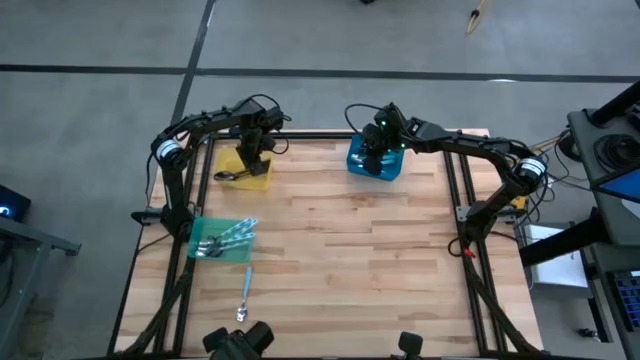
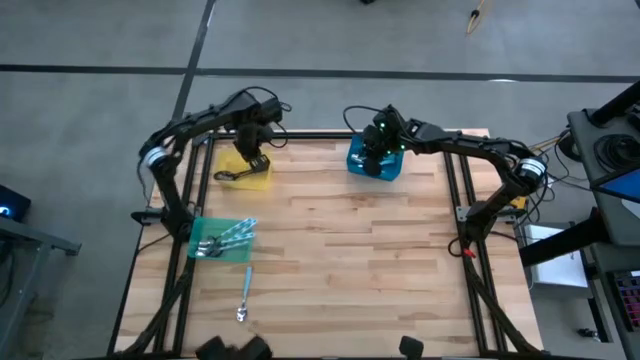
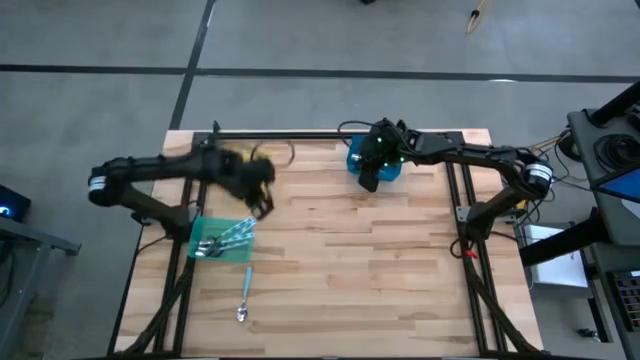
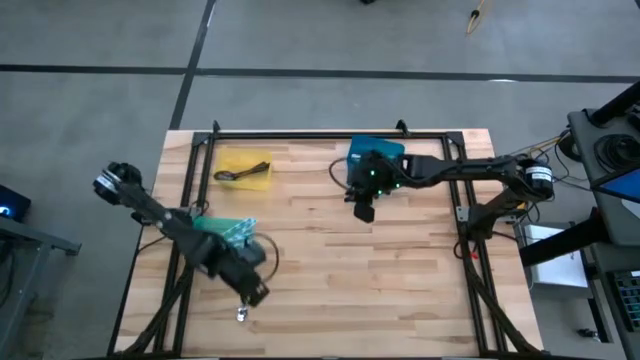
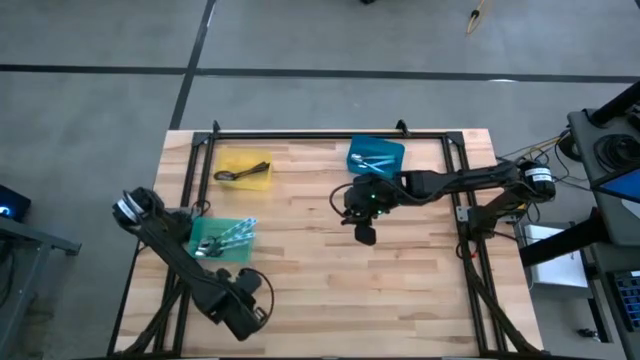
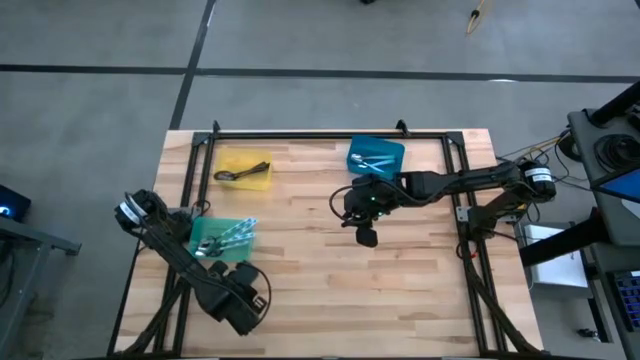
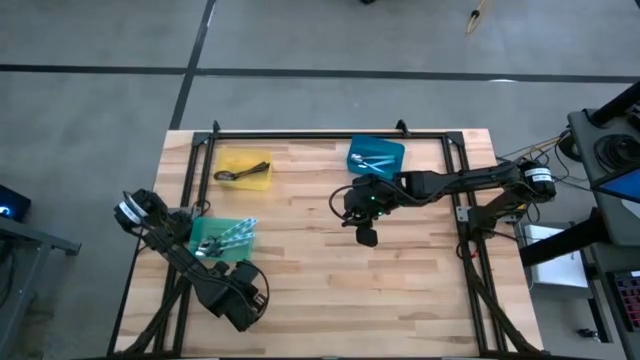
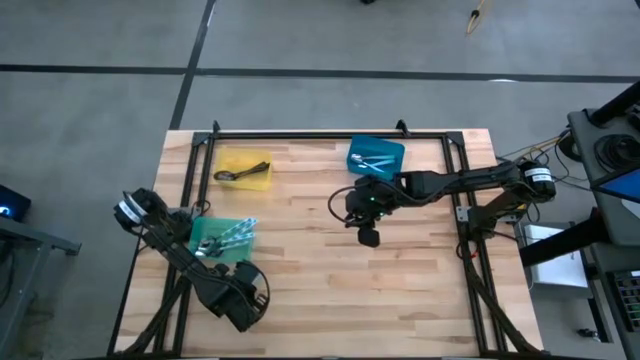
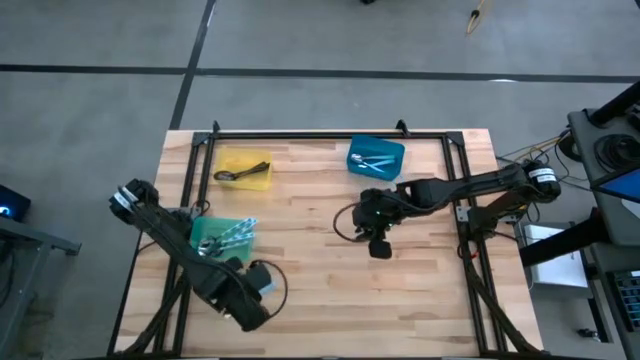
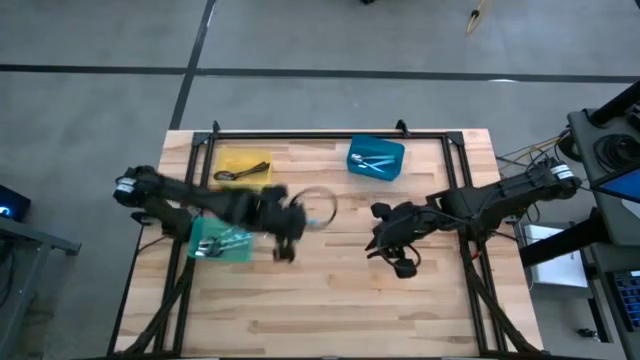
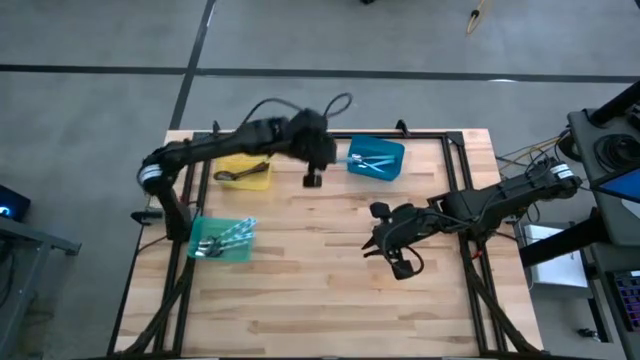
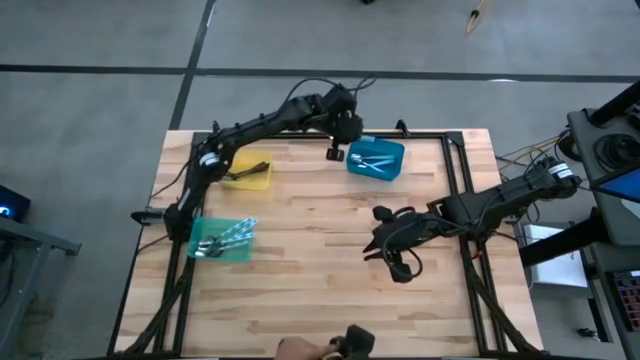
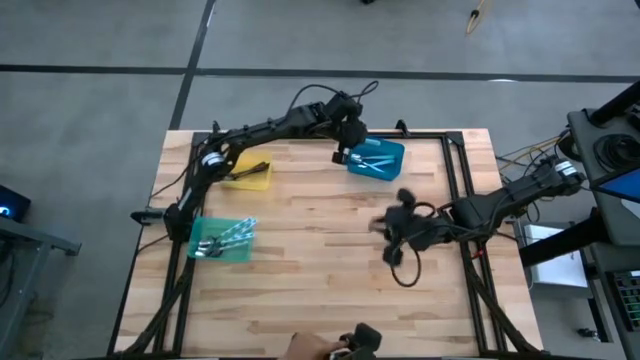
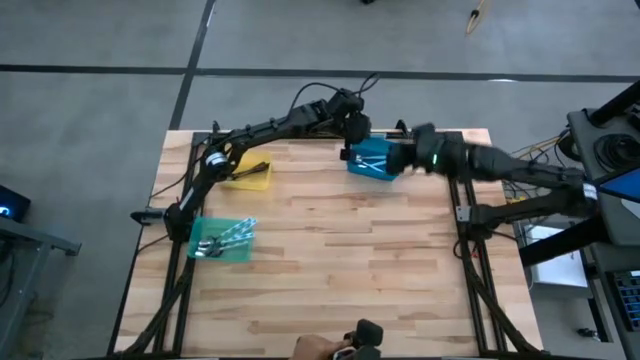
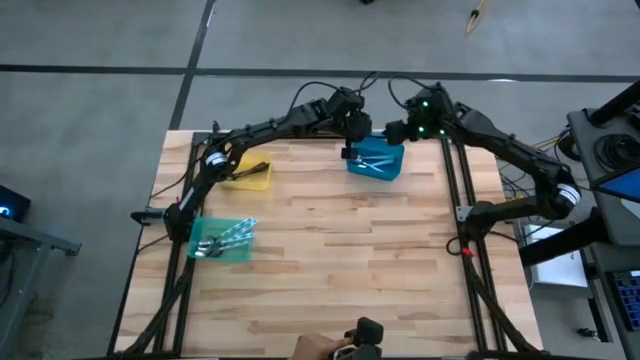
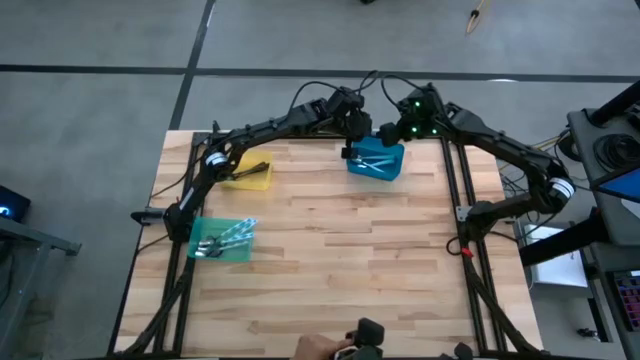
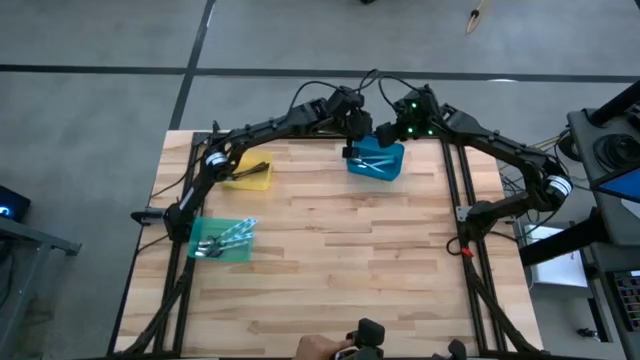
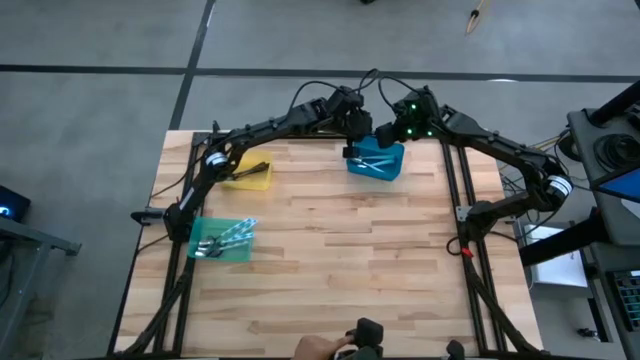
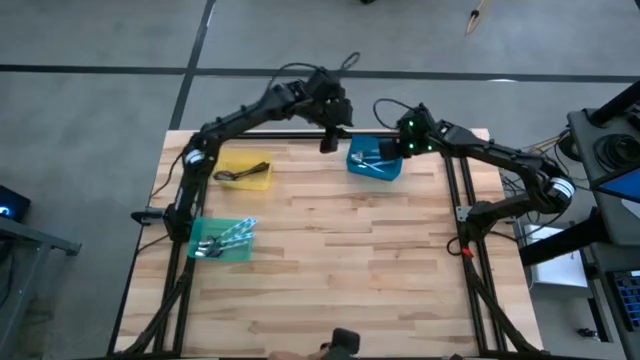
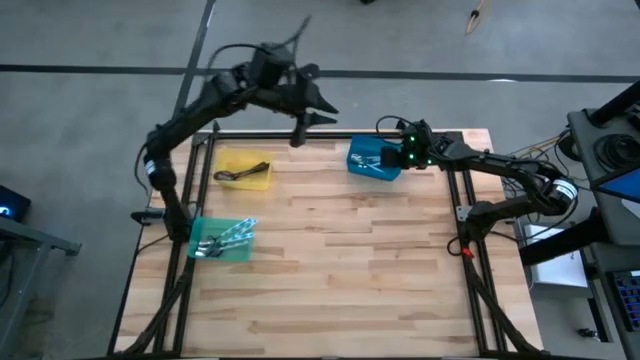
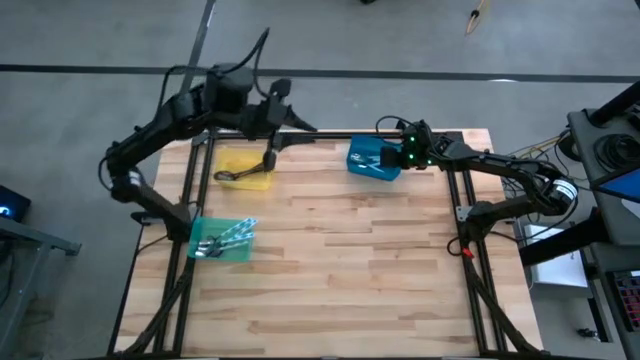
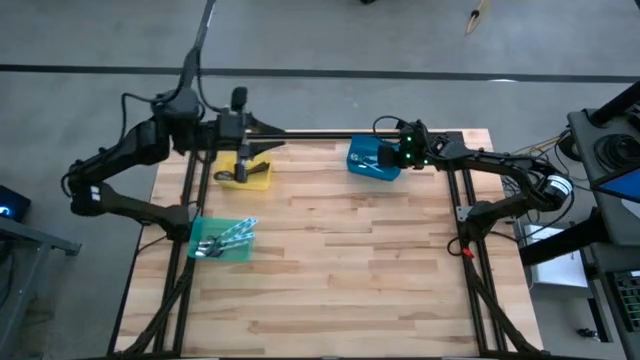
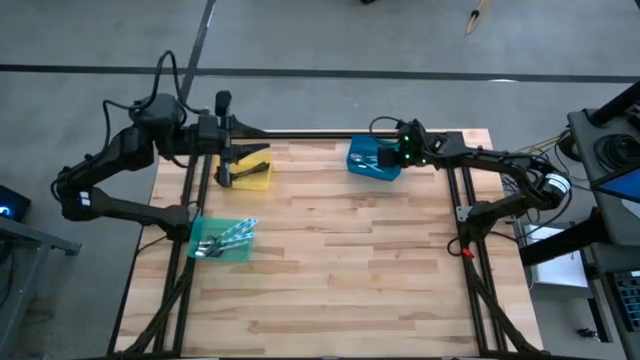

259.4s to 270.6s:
Task: Sort silverware by color (type)
Put the blue spoon into the blue bin

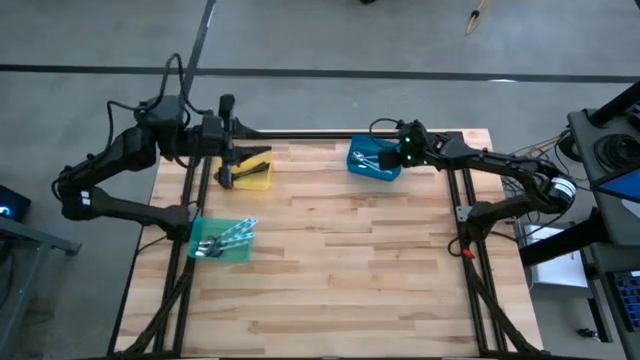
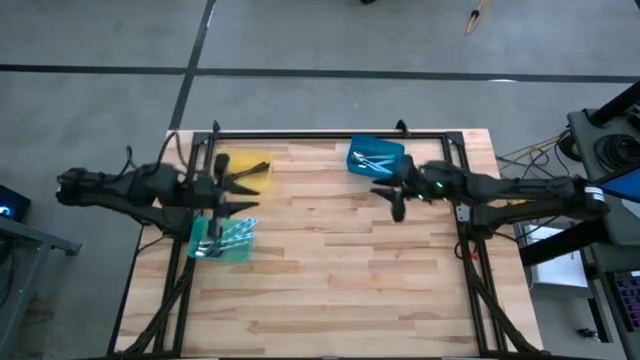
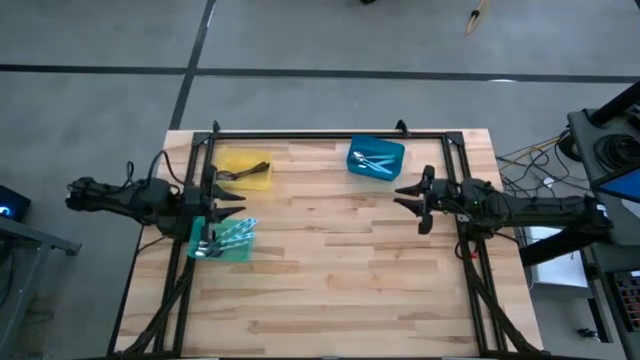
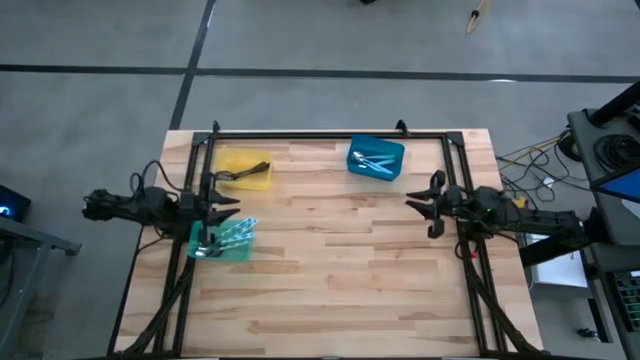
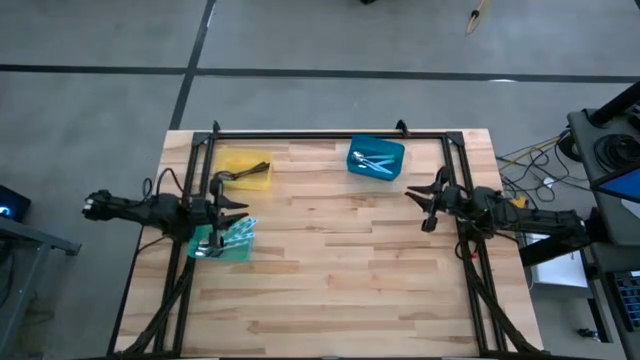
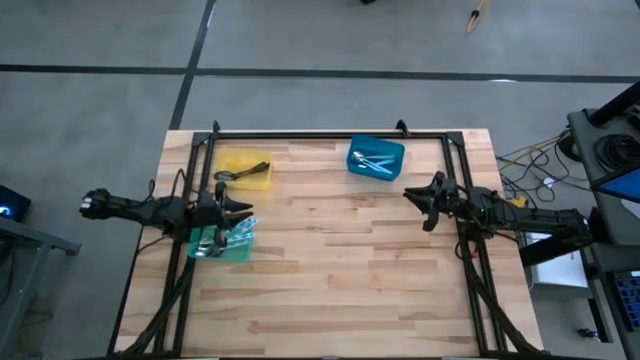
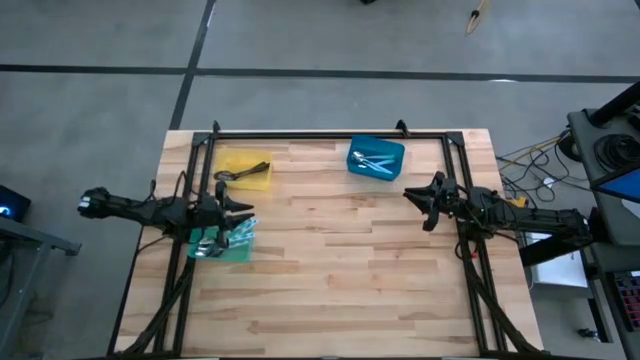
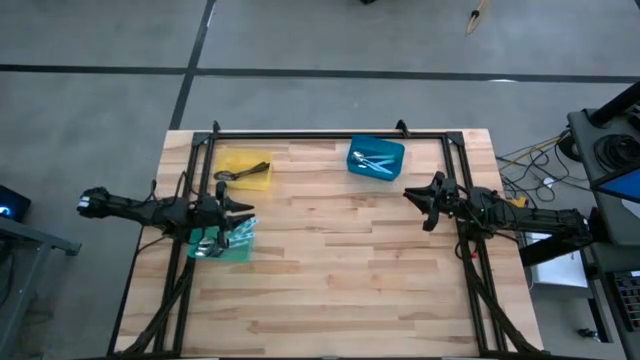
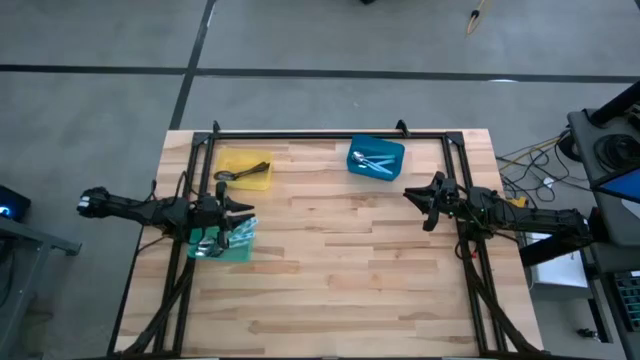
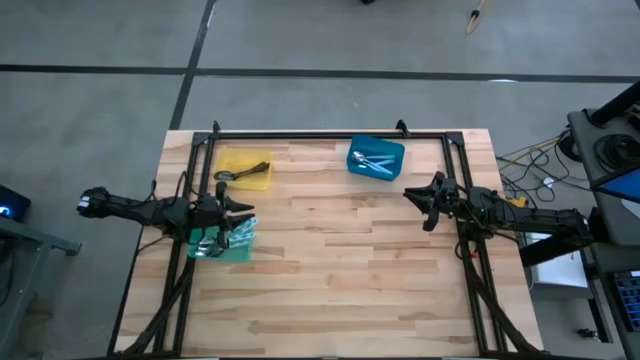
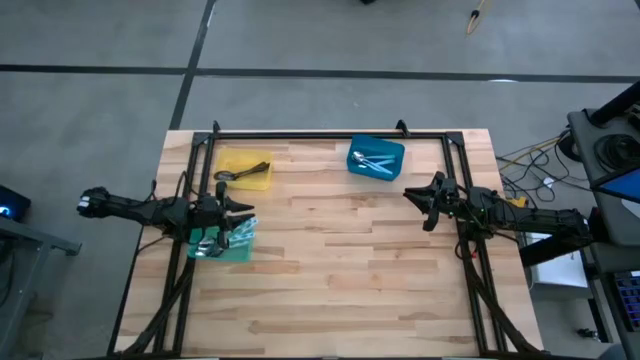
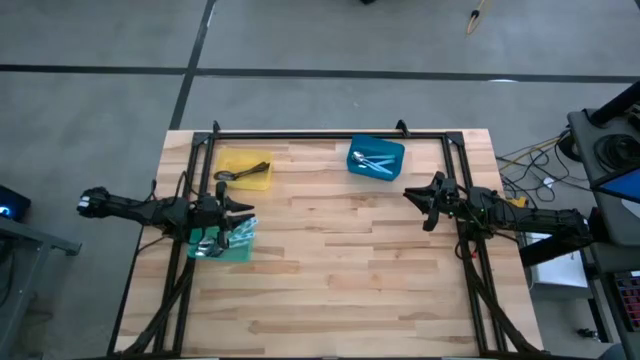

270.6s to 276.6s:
Return to Home Position

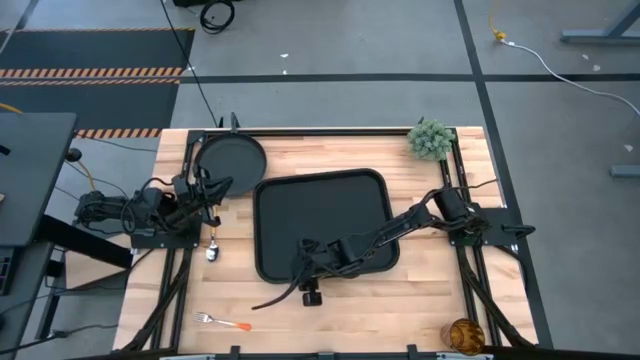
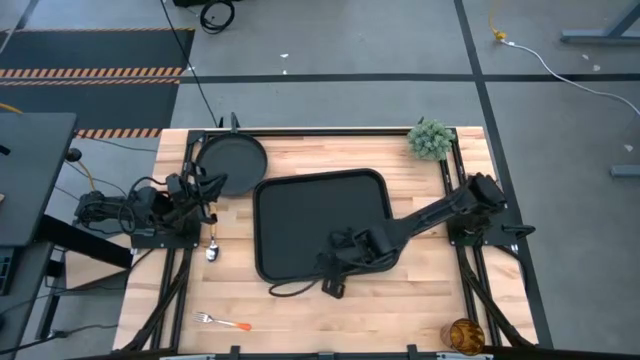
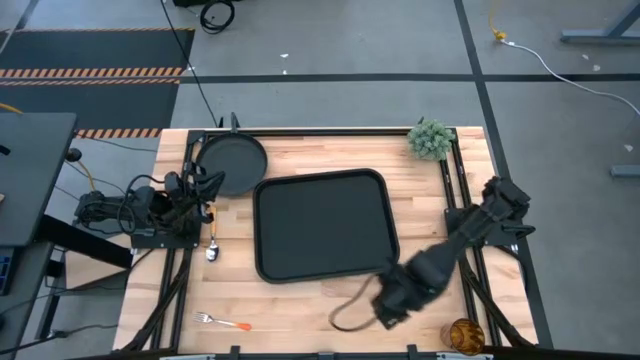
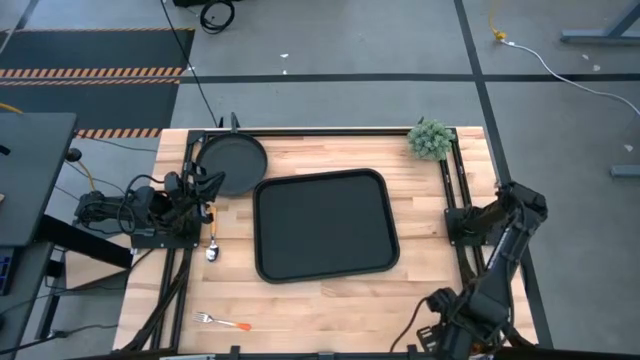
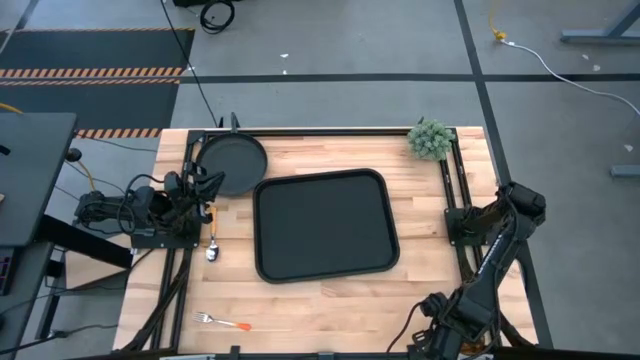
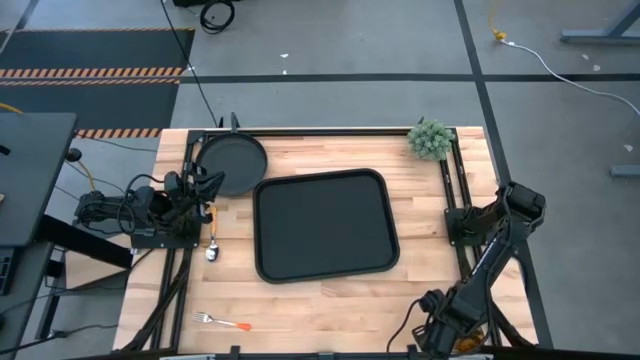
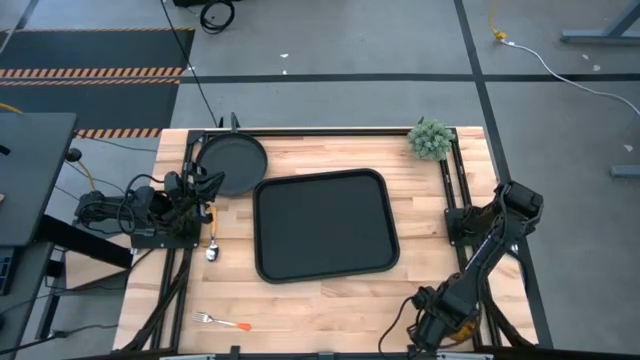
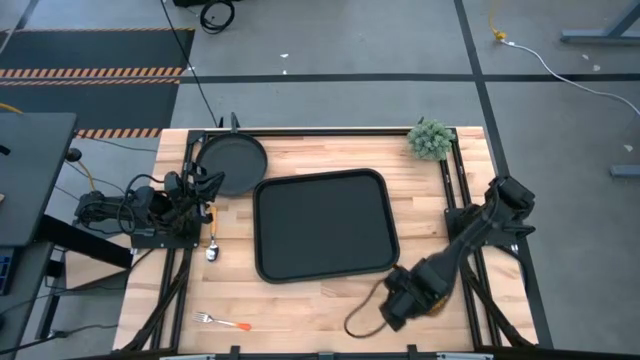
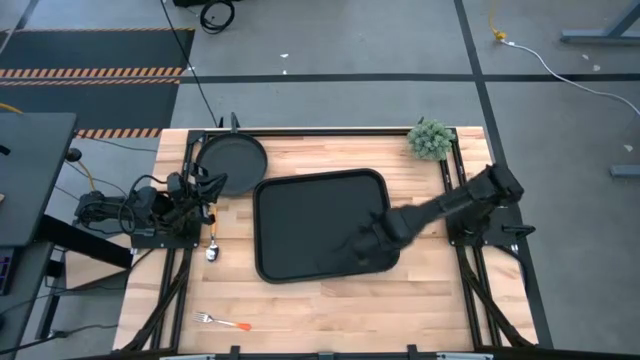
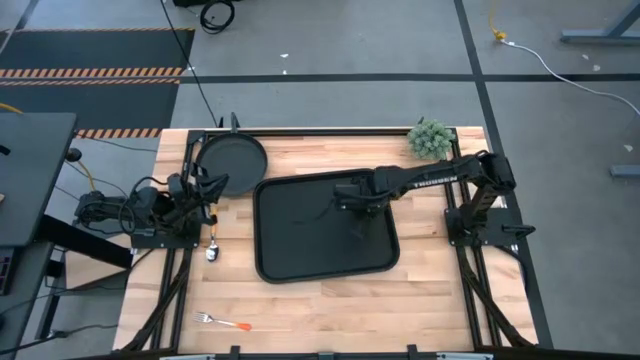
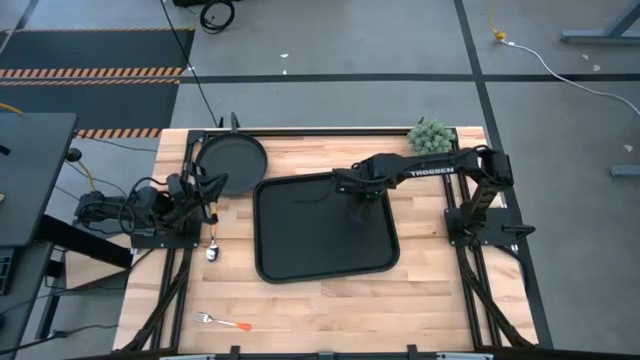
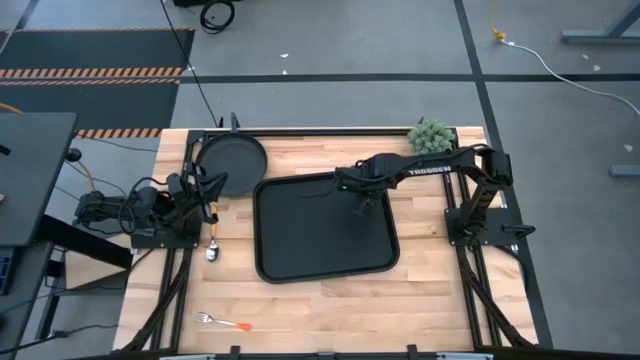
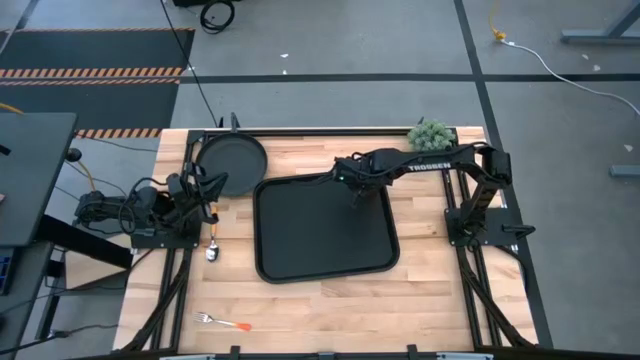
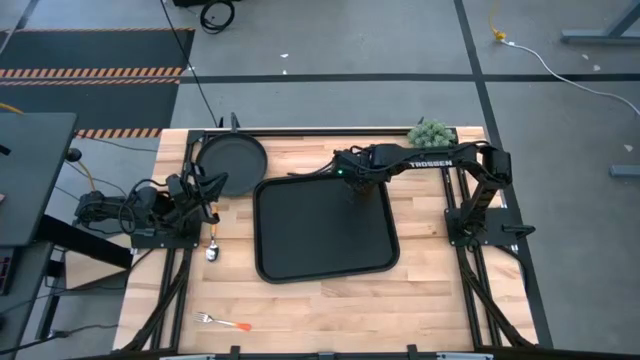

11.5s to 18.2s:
Task: Pick and place plate/cup/fork/spoon on tray
Put the brown glass on the black serving tray
